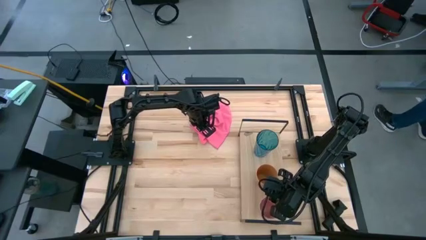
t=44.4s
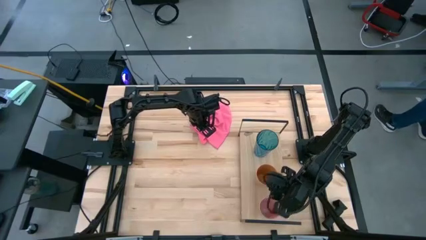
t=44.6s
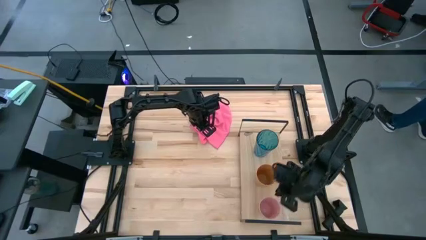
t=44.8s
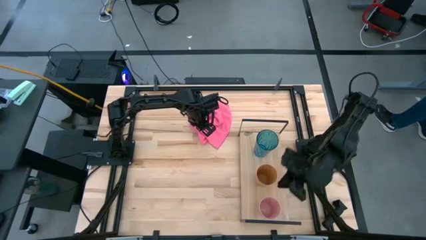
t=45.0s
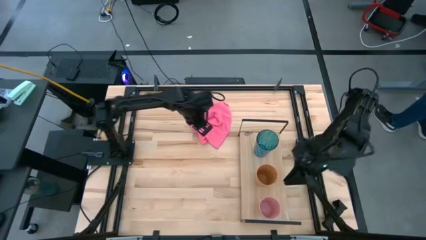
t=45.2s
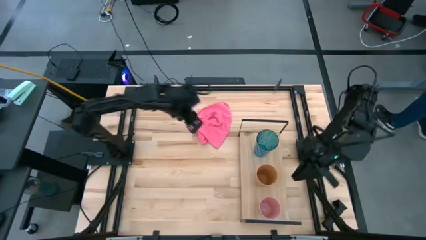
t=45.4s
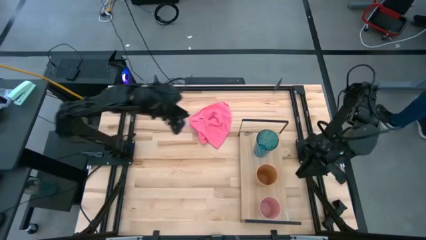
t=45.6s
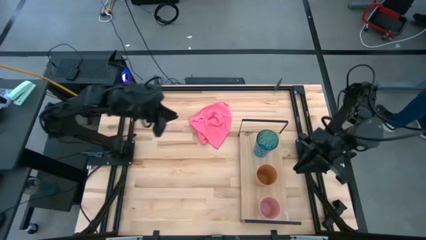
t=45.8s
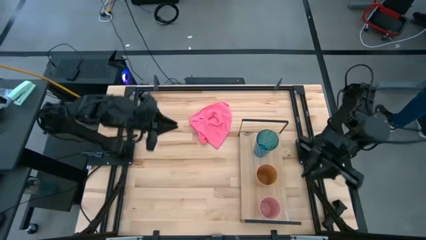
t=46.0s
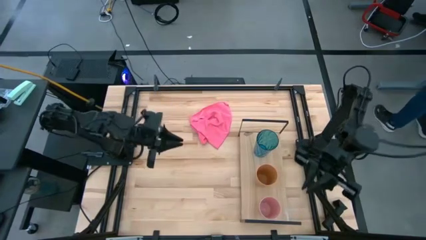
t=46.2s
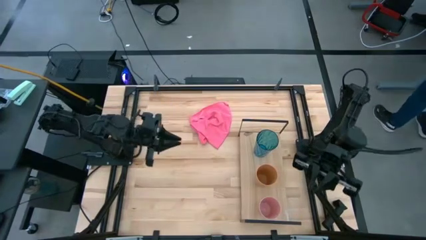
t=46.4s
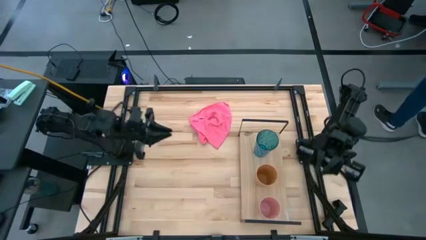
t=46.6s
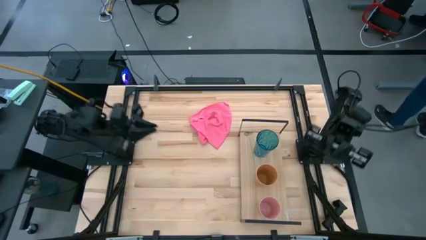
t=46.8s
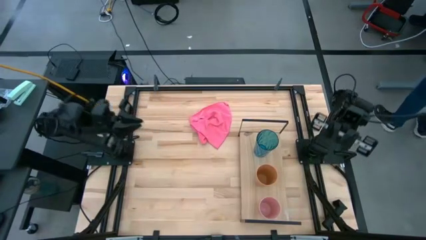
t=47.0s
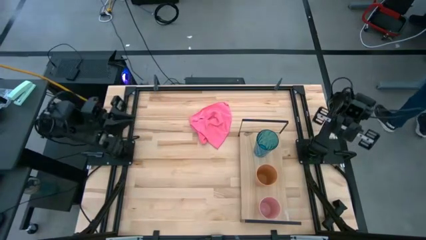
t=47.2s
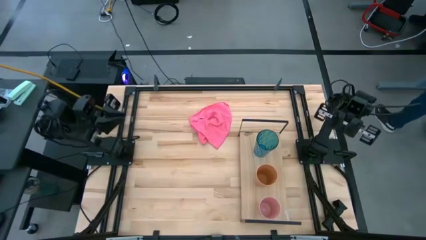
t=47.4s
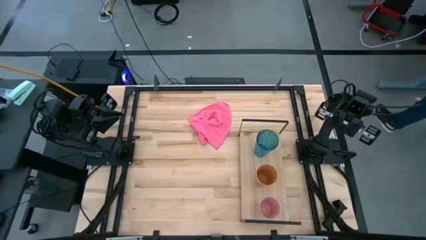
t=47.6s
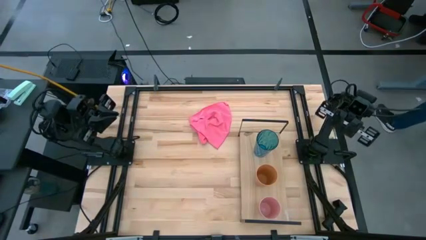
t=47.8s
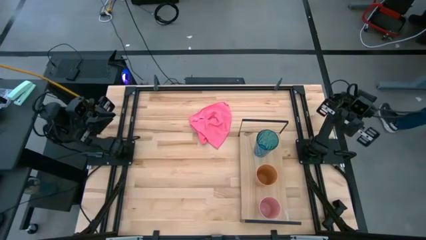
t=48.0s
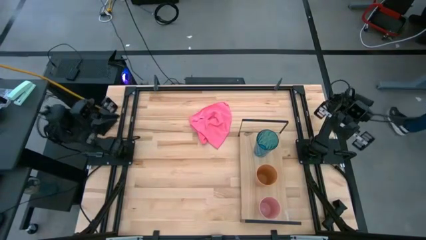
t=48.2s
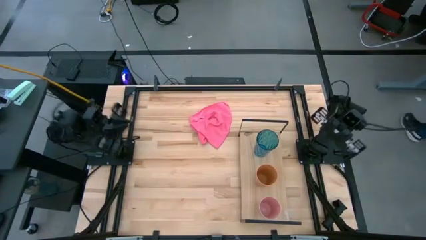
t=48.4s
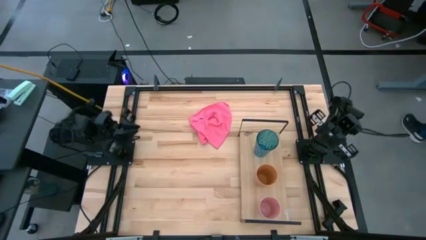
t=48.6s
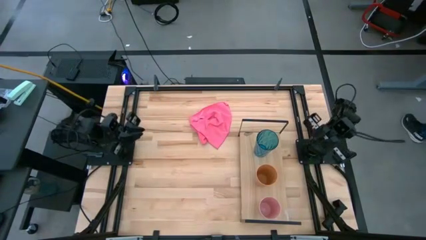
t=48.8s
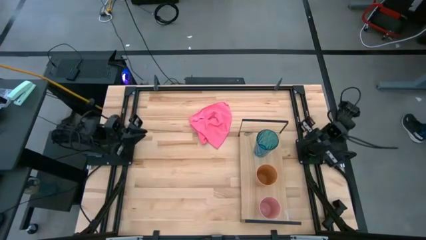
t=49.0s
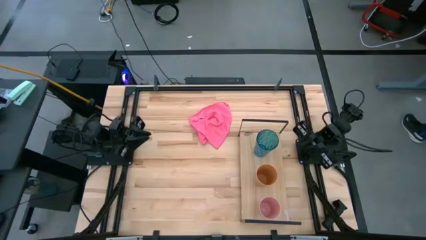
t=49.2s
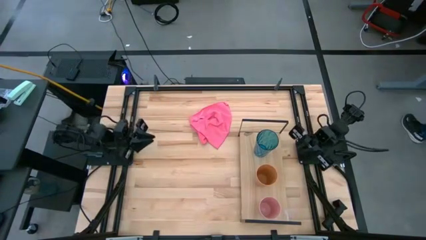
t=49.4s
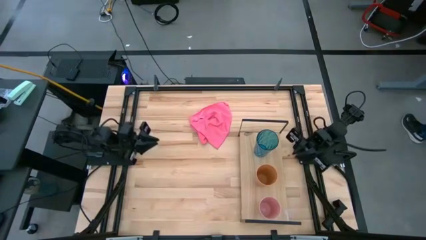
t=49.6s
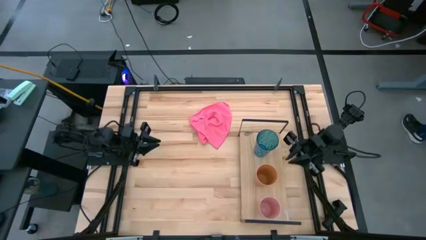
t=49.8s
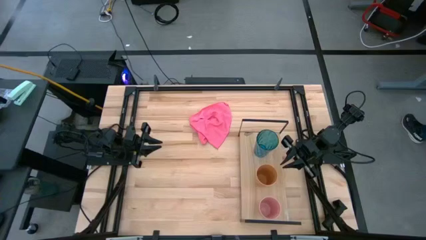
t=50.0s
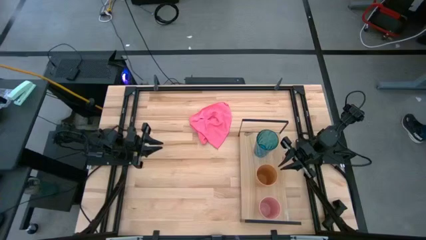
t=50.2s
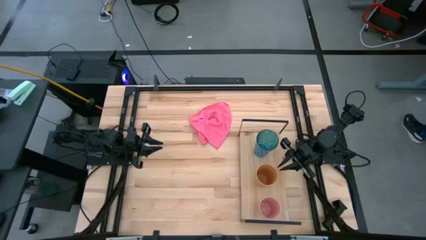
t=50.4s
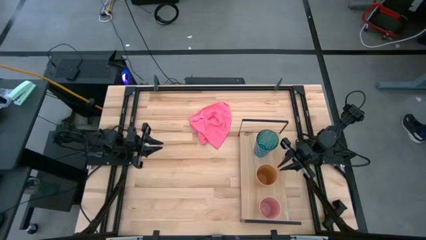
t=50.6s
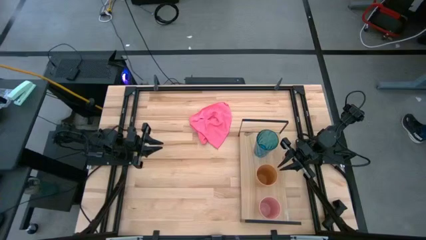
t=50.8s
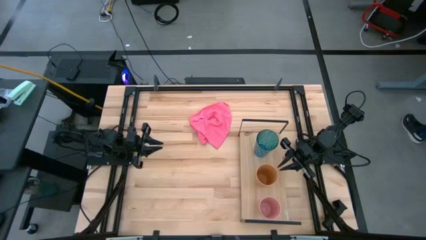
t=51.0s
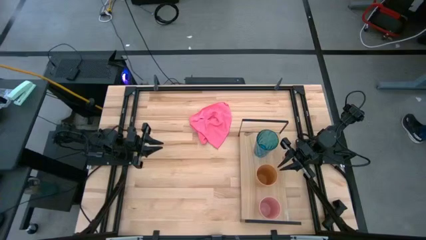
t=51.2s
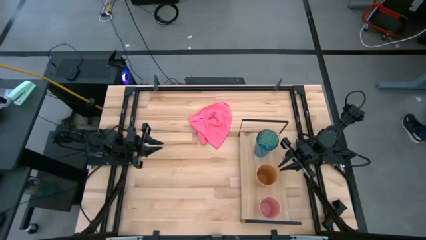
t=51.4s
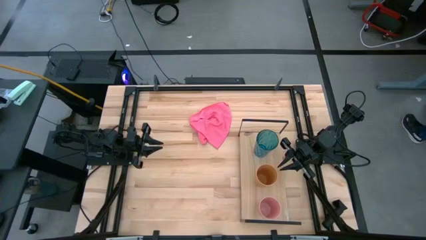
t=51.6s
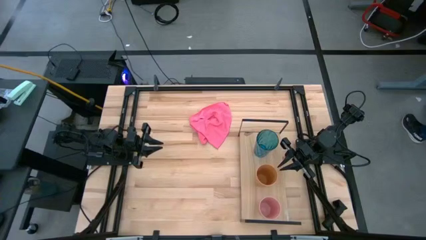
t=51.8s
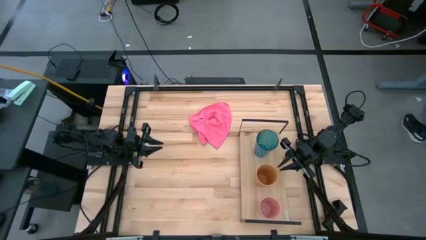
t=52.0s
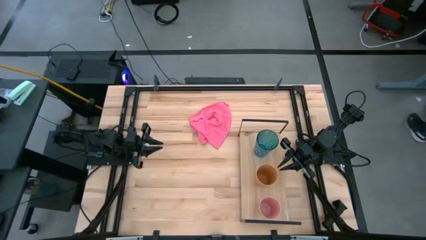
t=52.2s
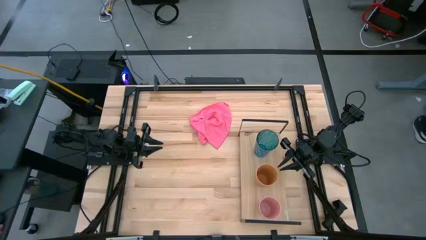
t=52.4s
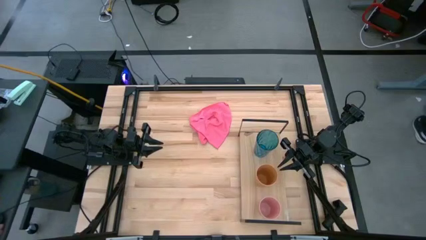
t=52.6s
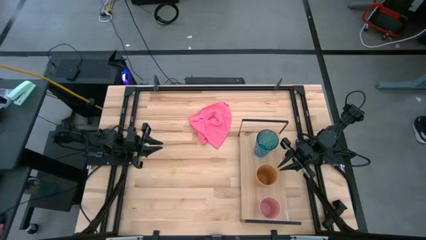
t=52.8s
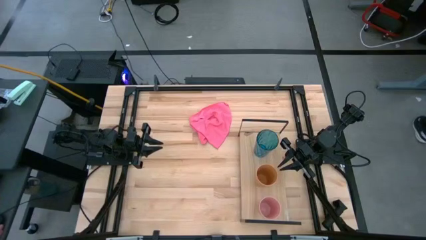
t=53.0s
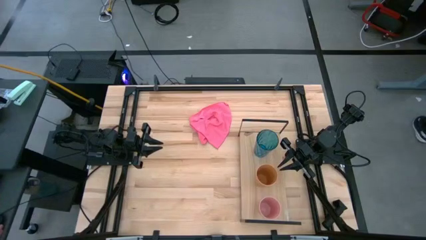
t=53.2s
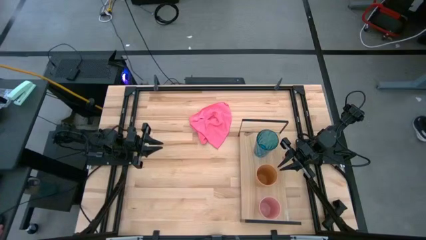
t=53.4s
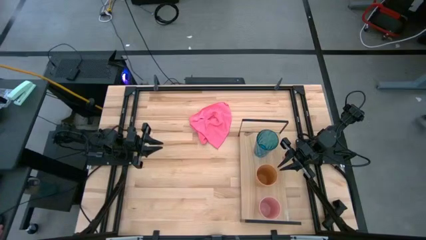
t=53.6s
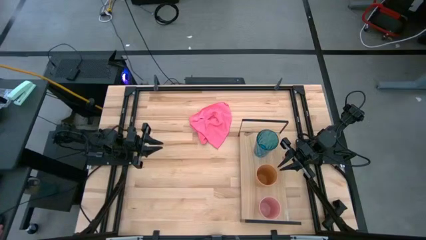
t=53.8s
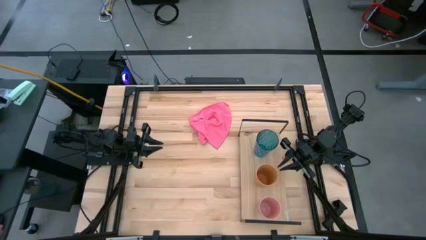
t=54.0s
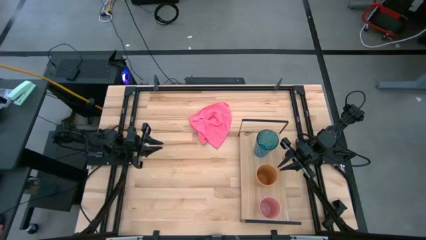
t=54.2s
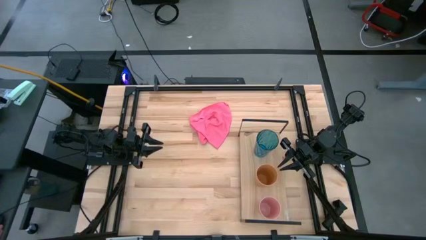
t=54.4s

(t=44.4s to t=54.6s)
Task: Stack small to large cups/mugs on shelf
Return to Home Position
